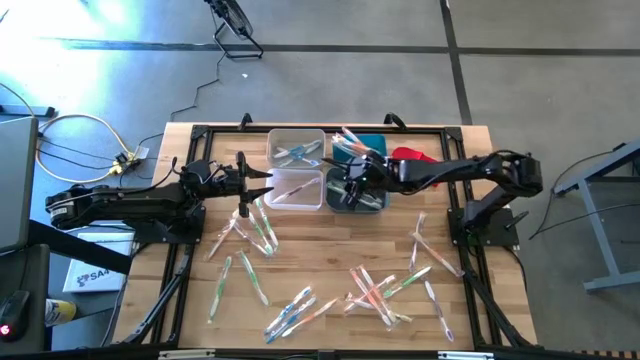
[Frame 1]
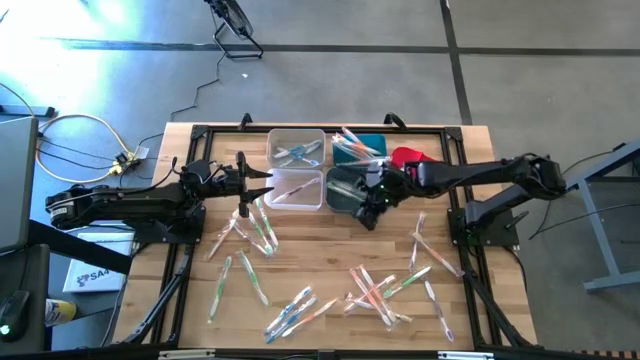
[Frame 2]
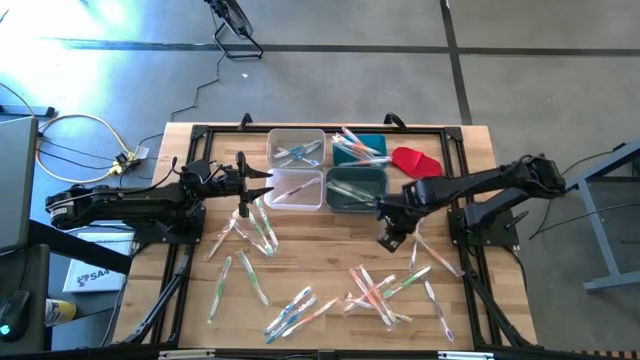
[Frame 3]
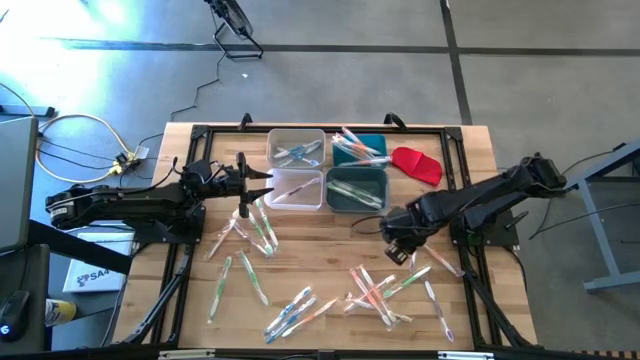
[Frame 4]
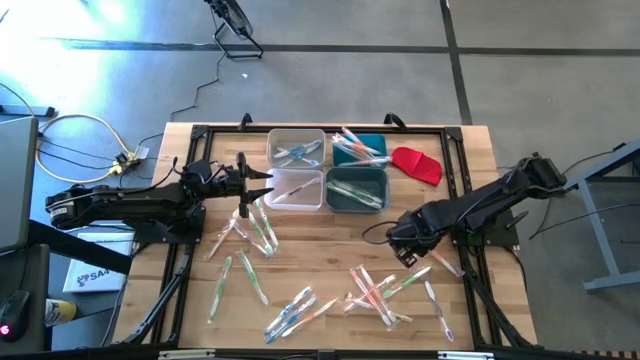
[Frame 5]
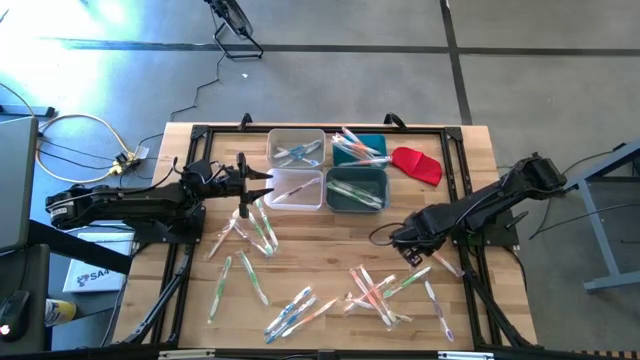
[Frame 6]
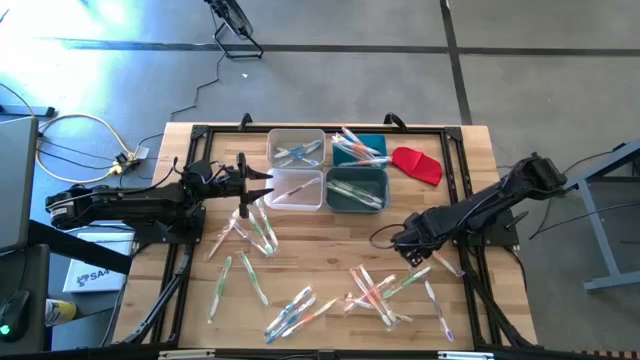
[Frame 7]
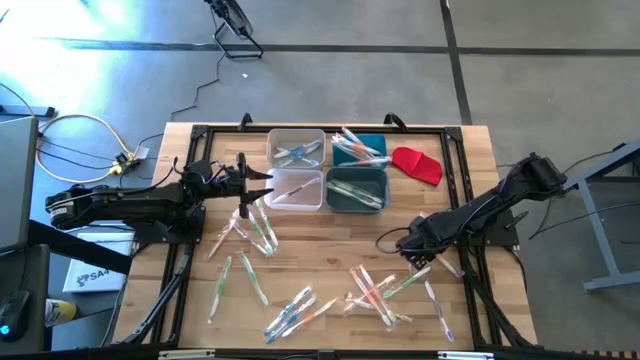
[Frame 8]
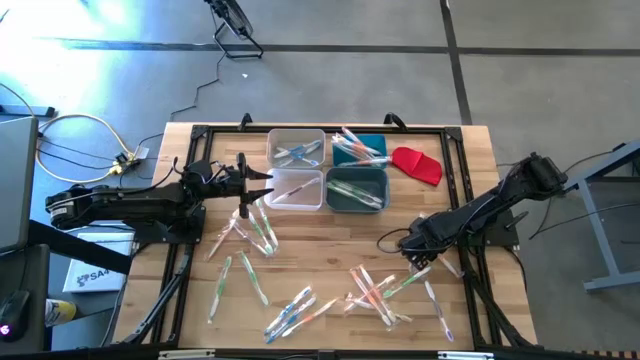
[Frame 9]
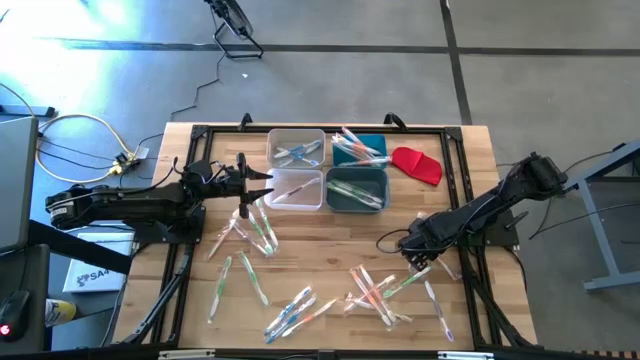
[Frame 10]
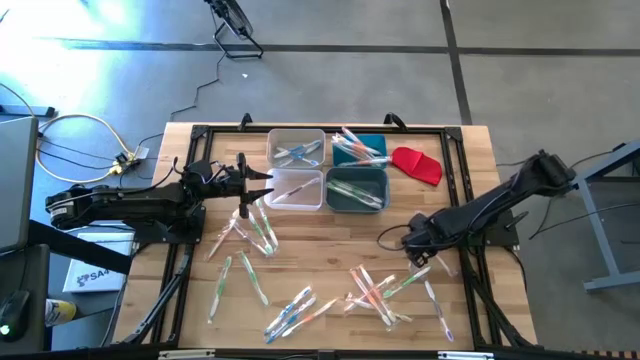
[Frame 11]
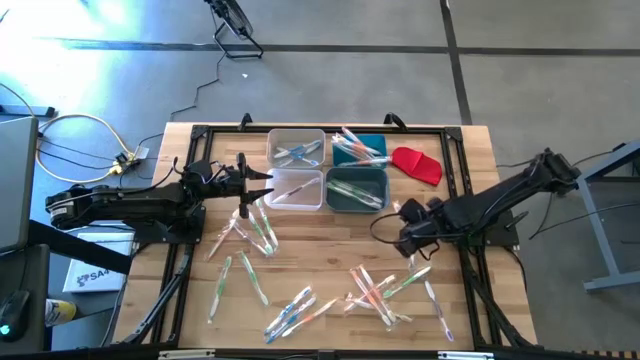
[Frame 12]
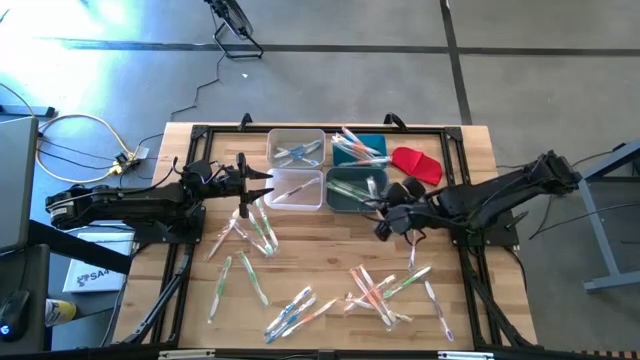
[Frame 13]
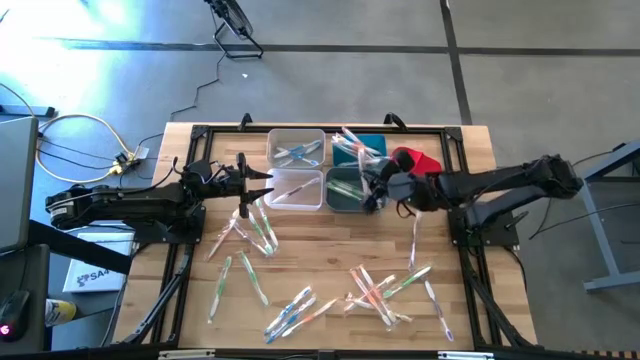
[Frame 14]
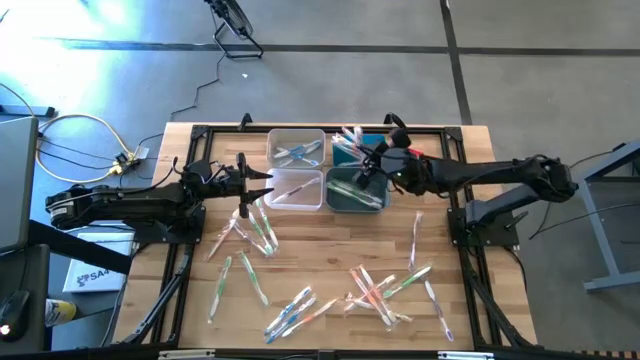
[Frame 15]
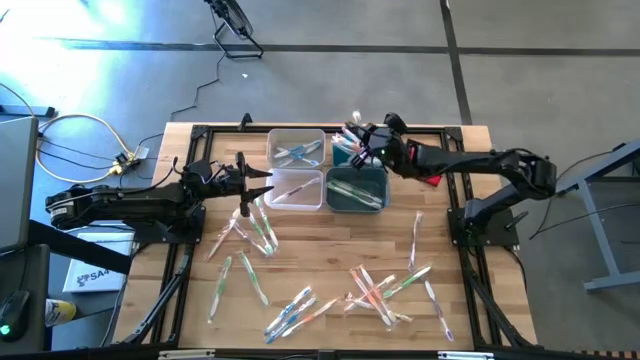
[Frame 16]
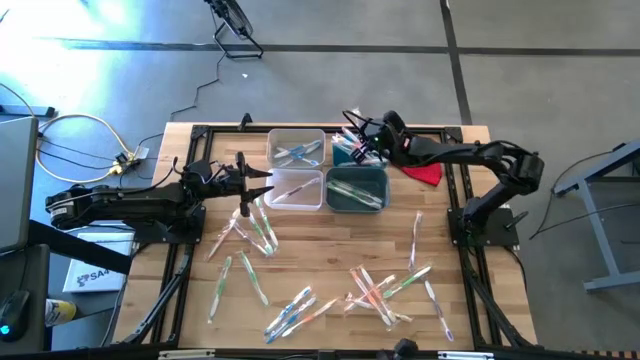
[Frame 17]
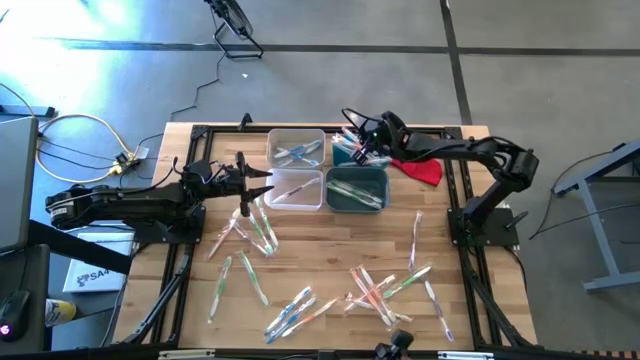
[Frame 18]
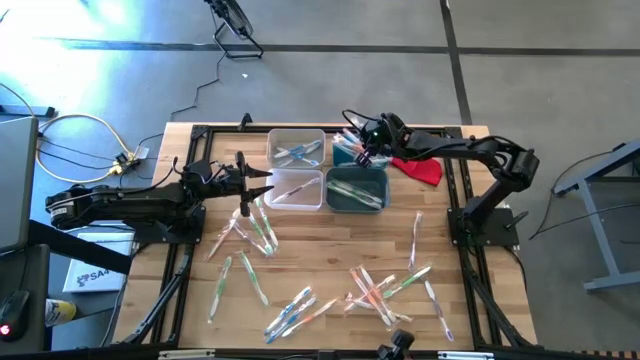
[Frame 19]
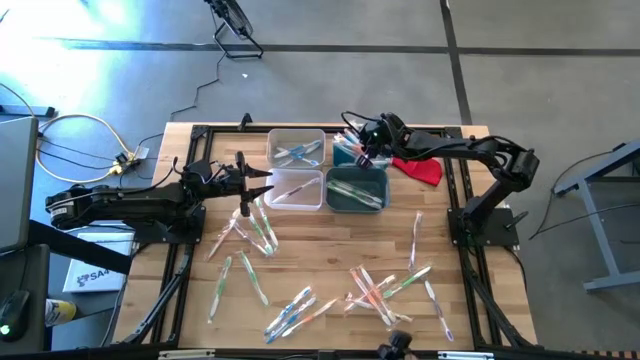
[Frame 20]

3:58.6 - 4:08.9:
Task: Pick & Place Toothbrushes
Put the orange toothbrush into the blue bin

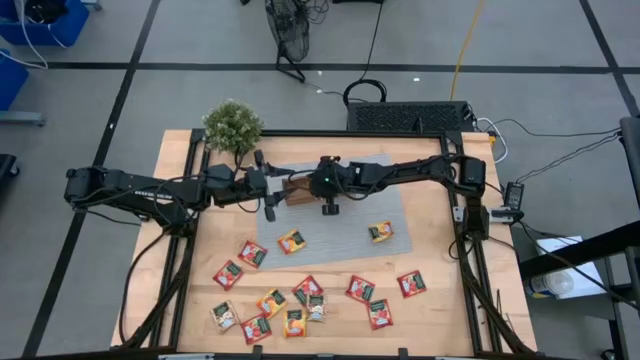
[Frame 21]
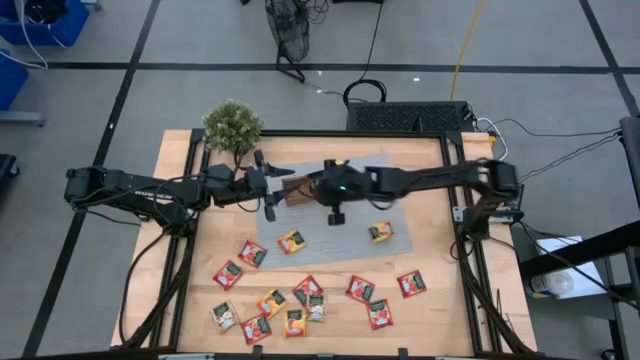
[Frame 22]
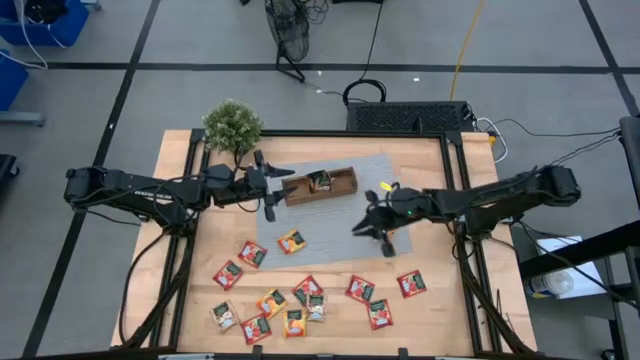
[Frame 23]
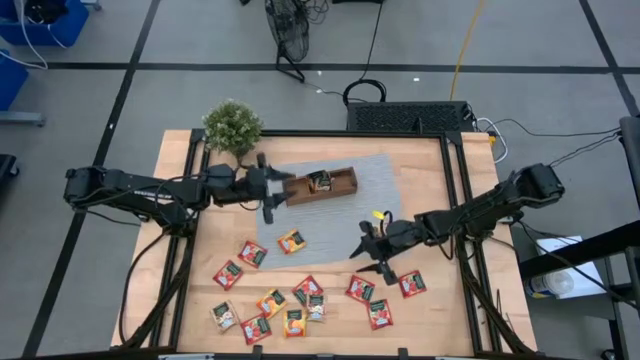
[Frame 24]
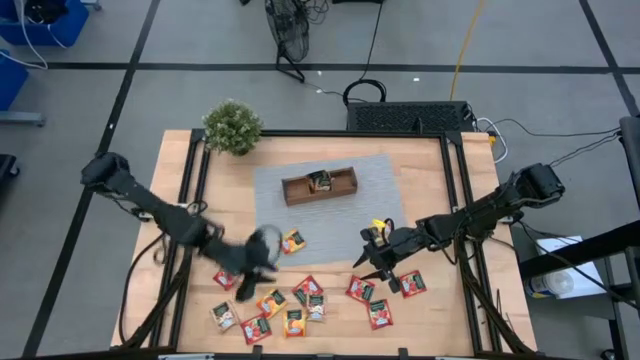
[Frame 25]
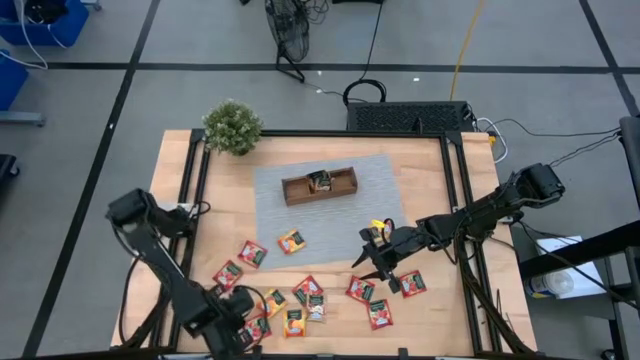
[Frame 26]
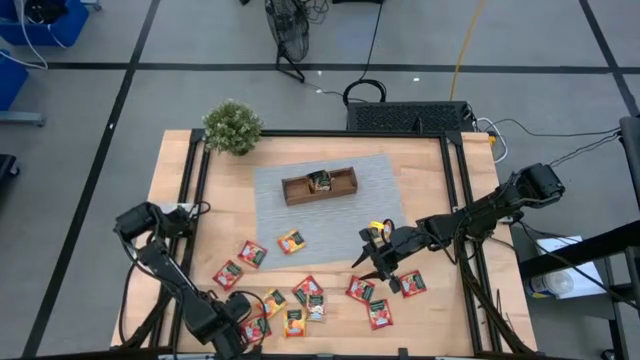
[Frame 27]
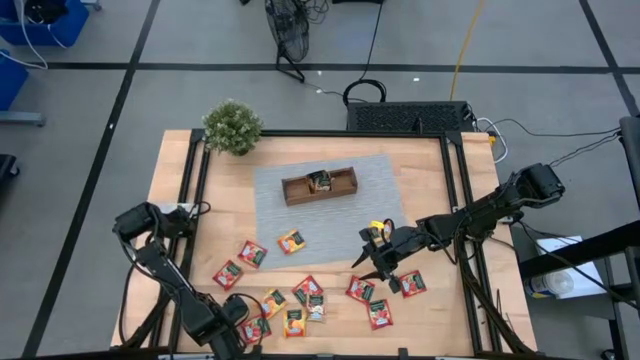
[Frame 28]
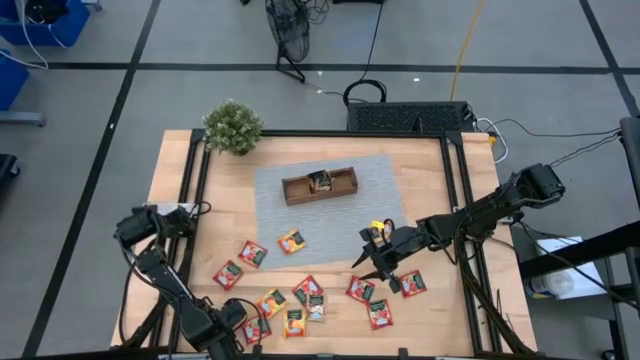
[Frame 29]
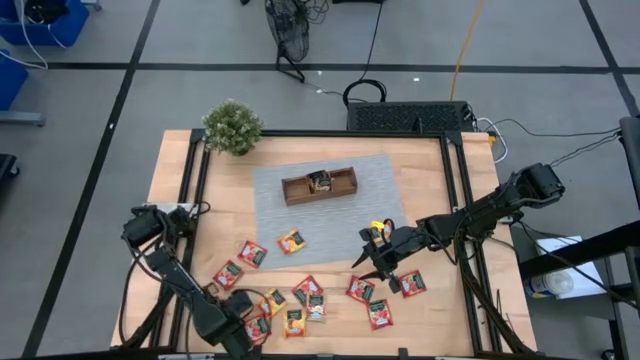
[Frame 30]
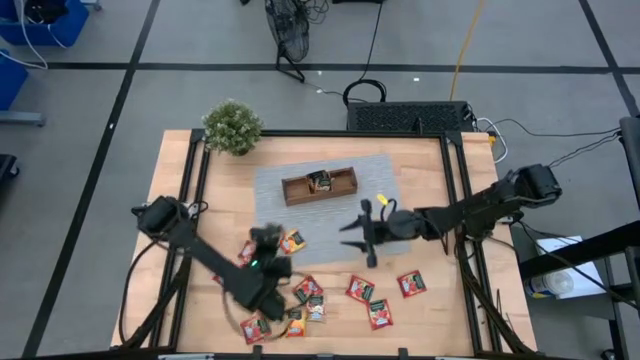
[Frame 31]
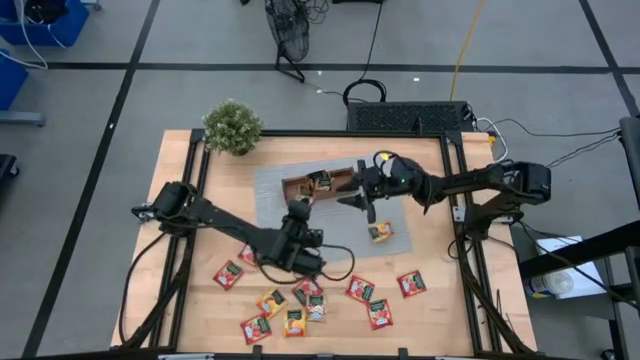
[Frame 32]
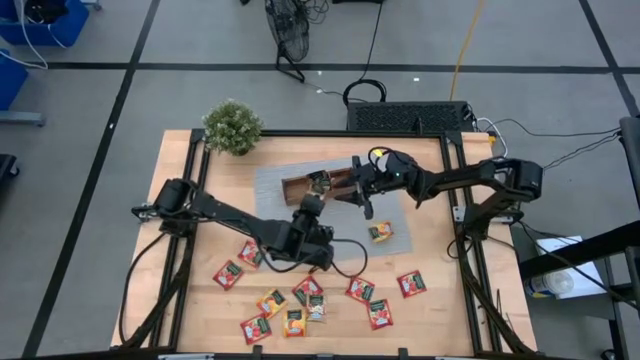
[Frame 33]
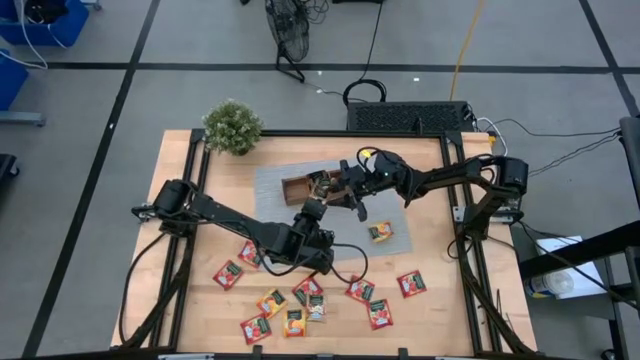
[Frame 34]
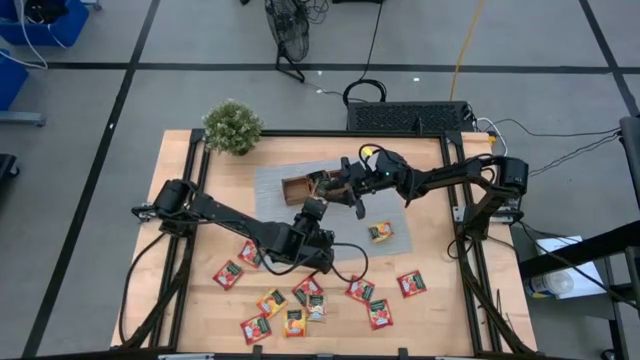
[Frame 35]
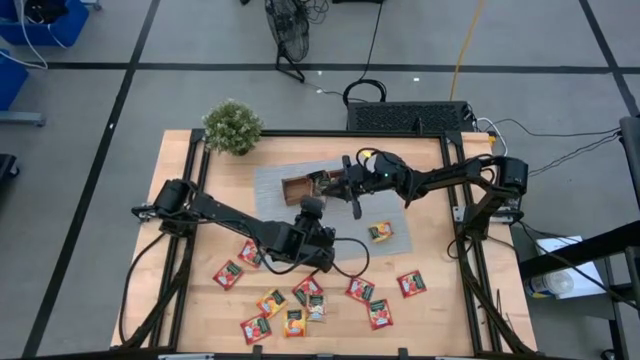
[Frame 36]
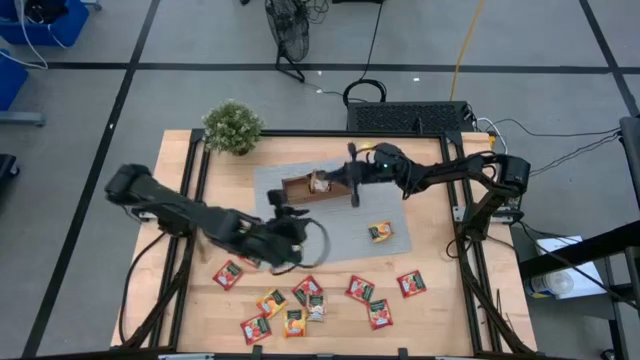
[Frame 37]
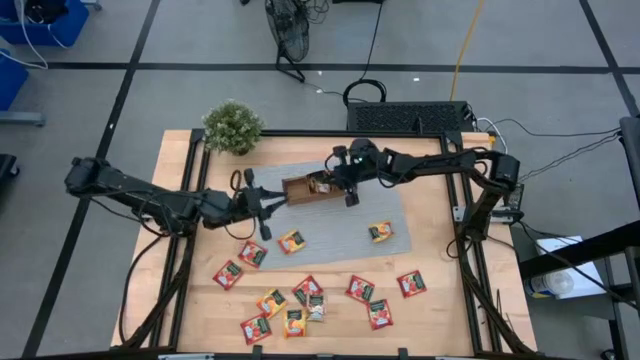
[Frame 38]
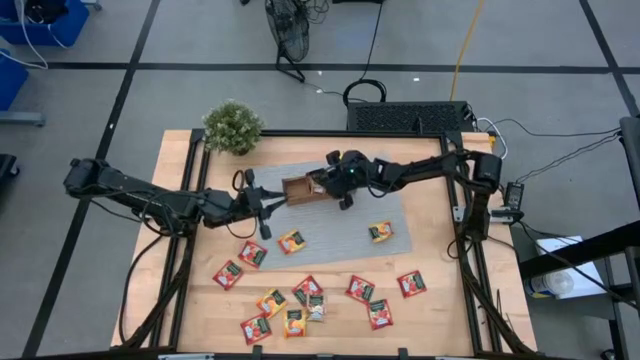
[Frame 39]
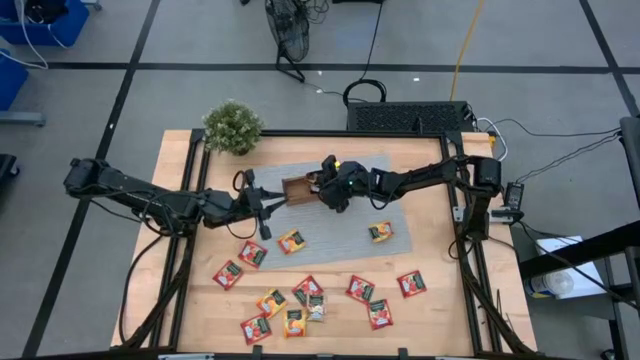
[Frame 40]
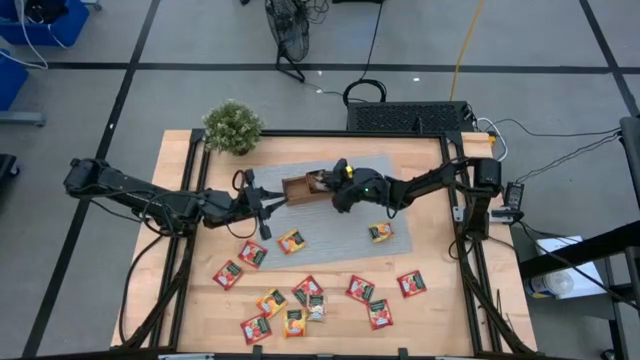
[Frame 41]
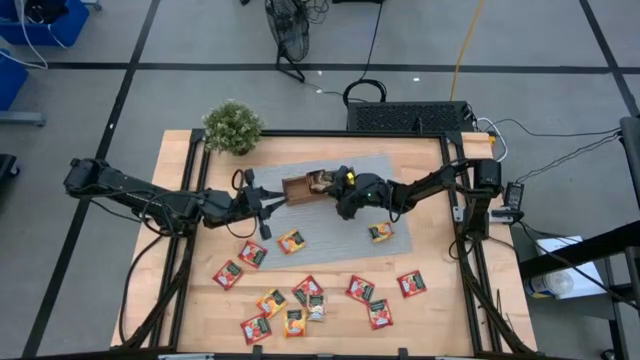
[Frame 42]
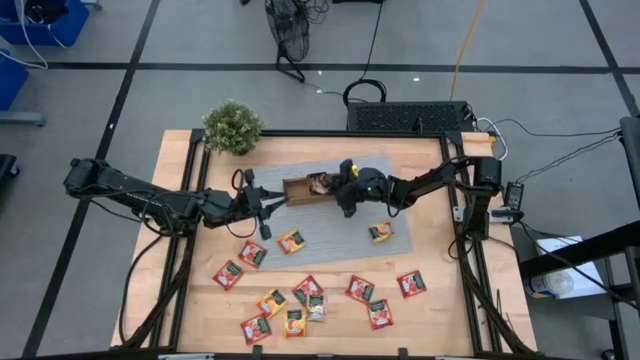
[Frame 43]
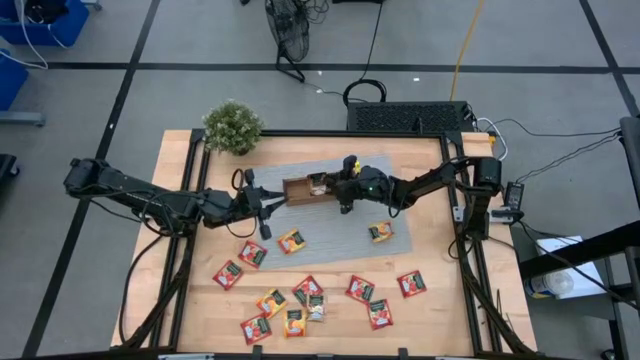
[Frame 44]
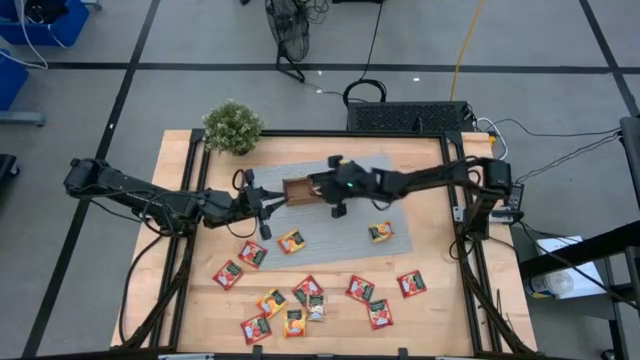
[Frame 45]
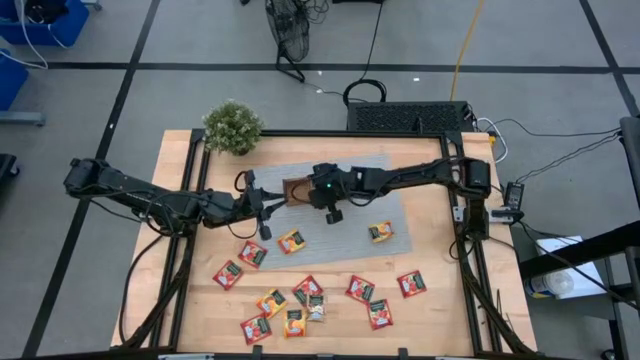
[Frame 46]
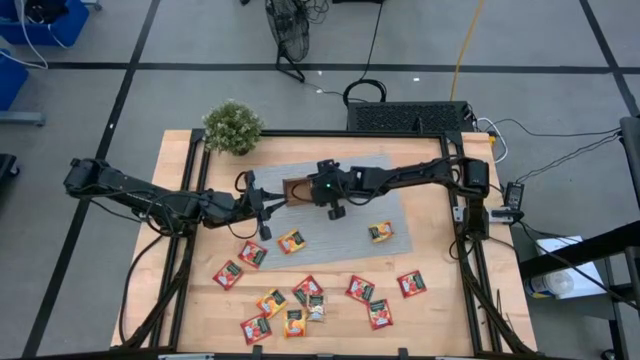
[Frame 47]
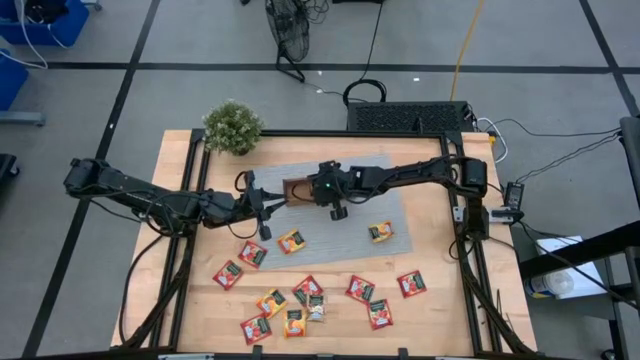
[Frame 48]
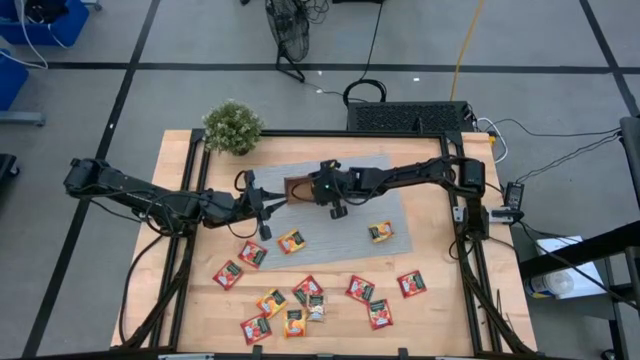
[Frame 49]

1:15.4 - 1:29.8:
Task: Pick & Place Tea
Put the brown tea bag into the middle section of the wooden organizer
